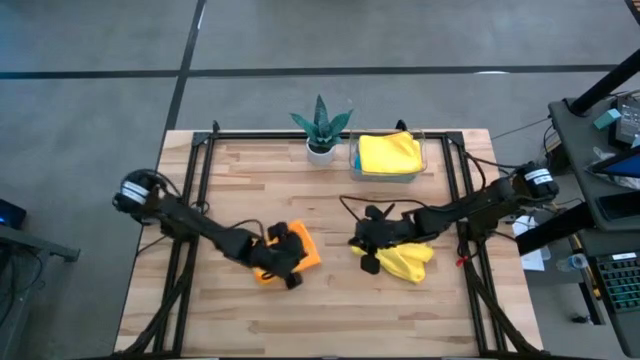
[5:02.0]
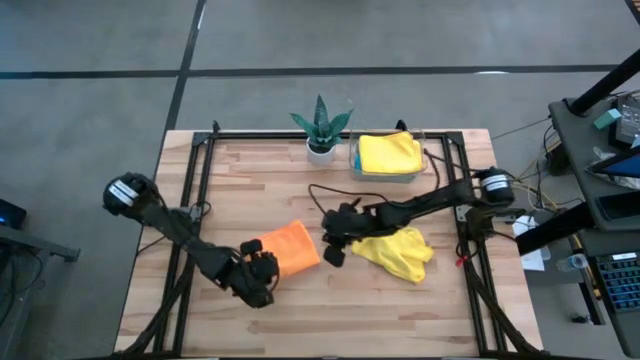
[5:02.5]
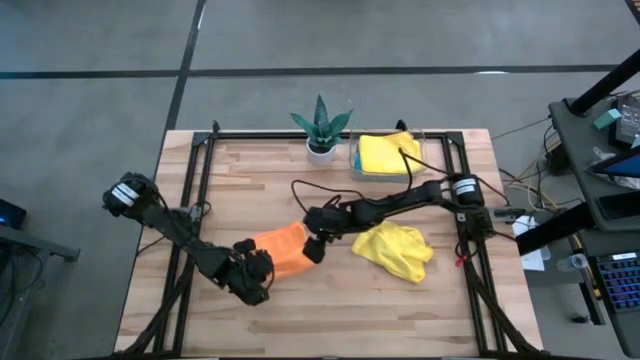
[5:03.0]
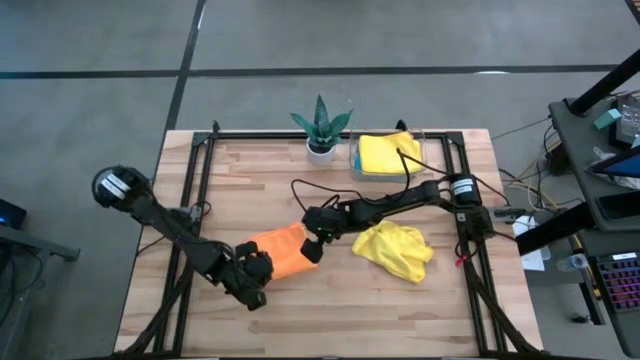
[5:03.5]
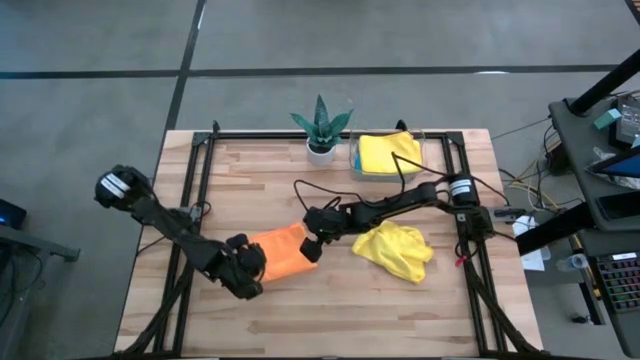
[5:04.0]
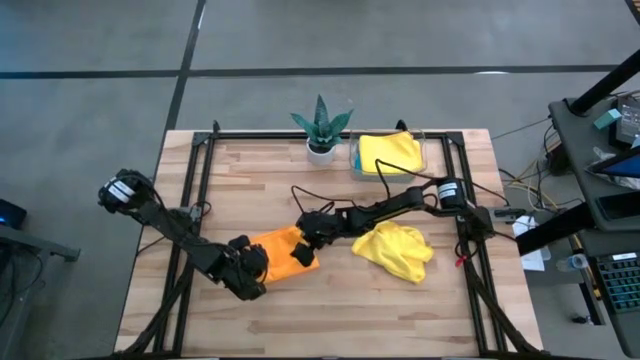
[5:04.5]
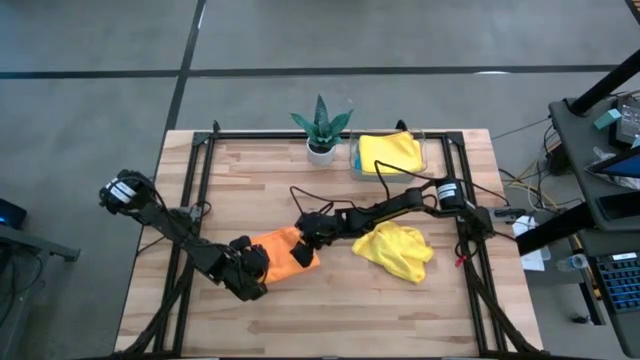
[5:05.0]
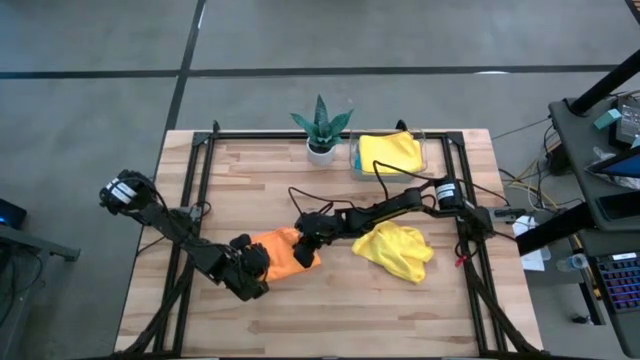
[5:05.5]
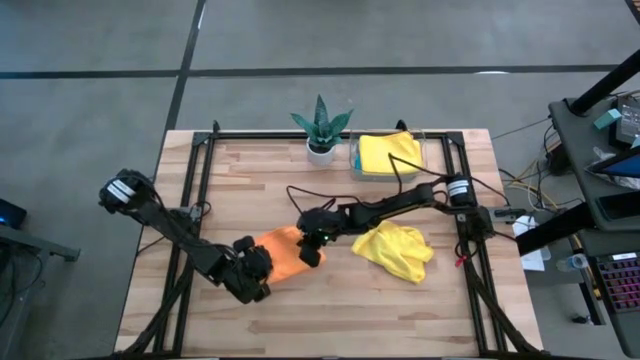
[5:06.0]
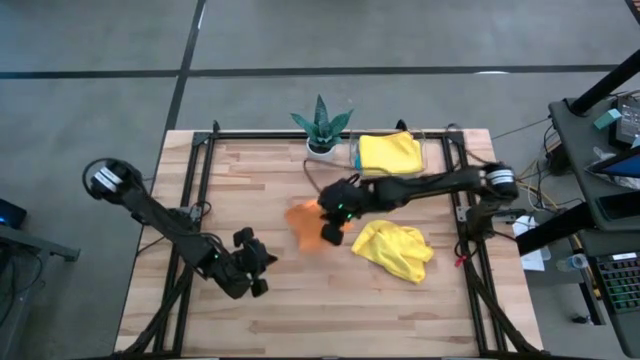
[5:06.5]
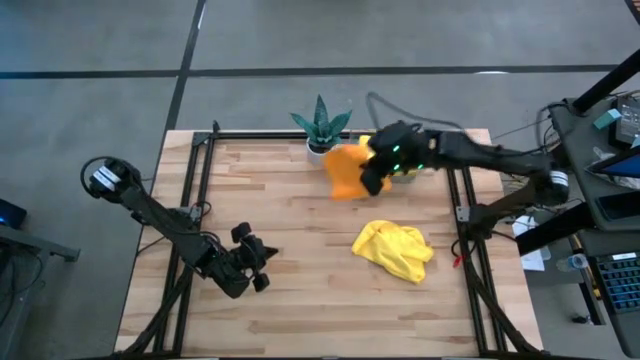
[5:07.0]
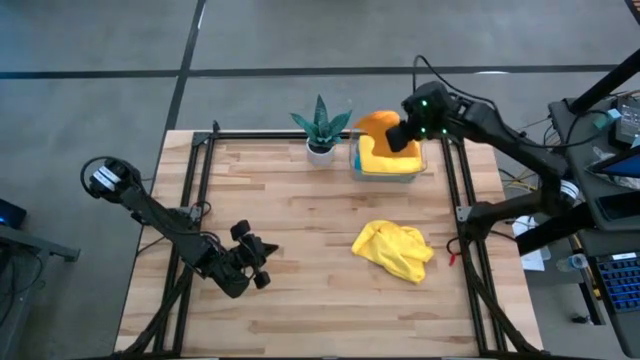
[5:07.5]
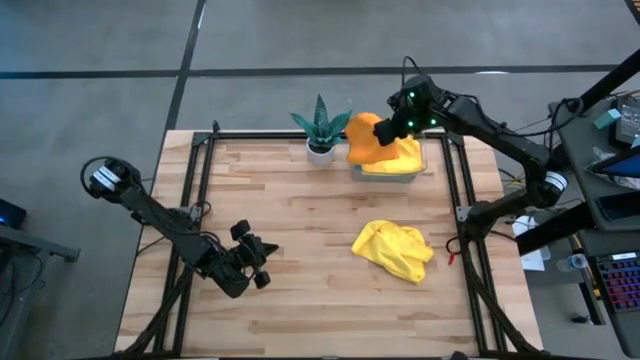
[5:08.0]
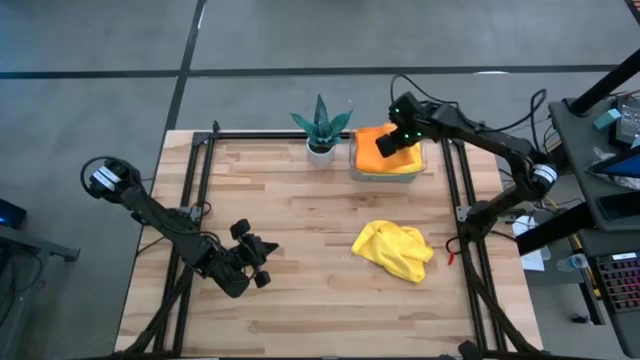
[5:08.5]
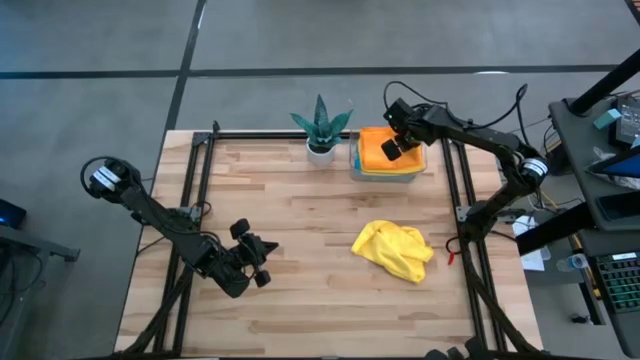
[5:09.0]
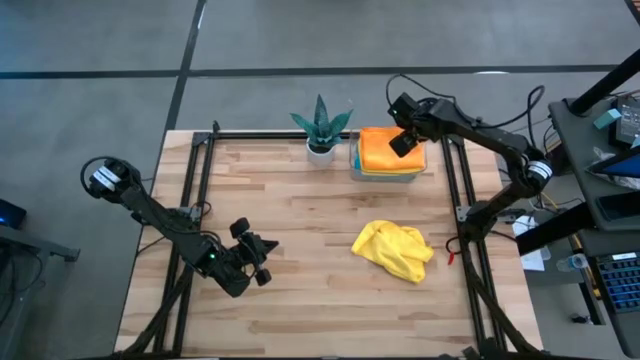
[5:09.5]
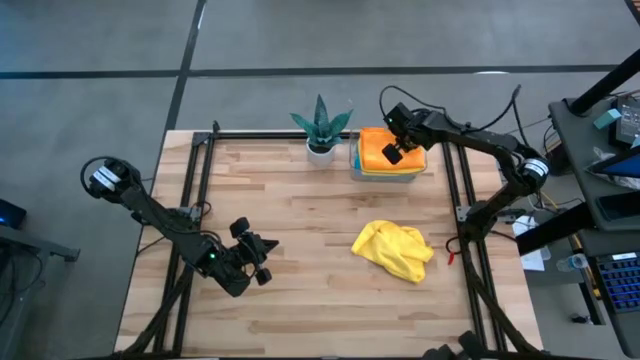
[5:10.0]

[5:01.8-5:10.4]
Task: Fold microfiber towels
Put the orange microfiber towel into the transparent bin

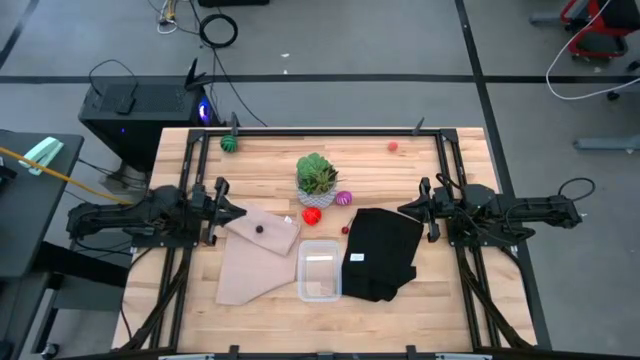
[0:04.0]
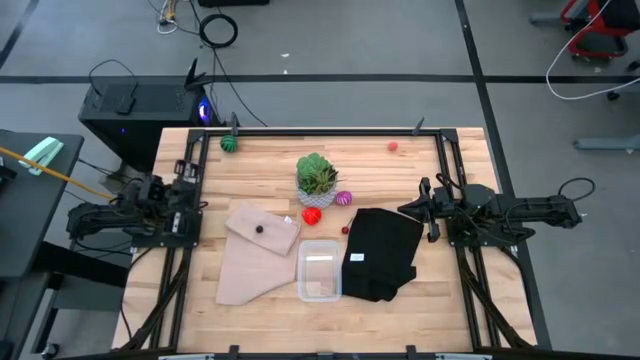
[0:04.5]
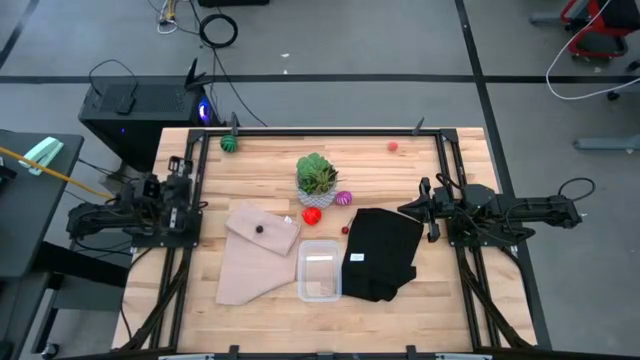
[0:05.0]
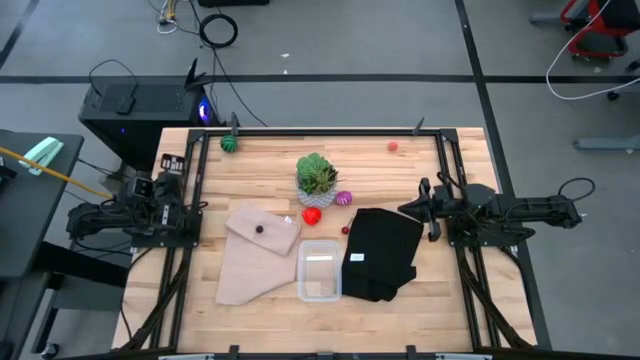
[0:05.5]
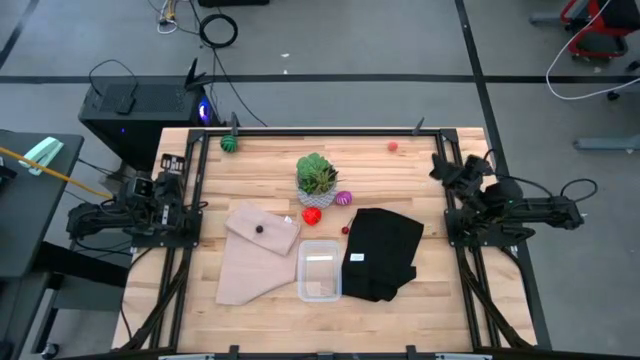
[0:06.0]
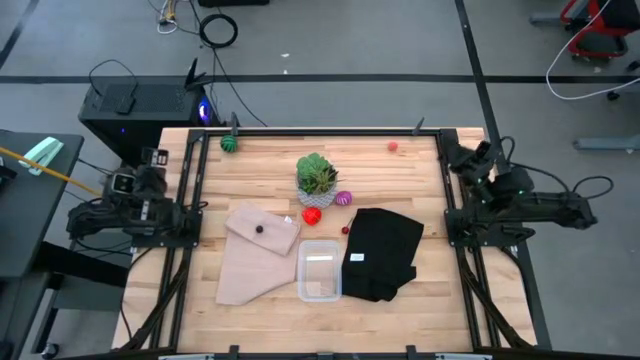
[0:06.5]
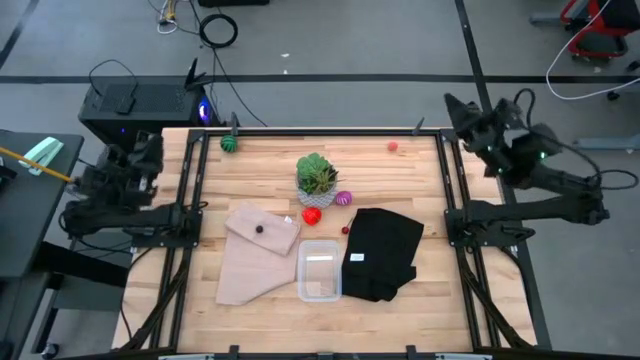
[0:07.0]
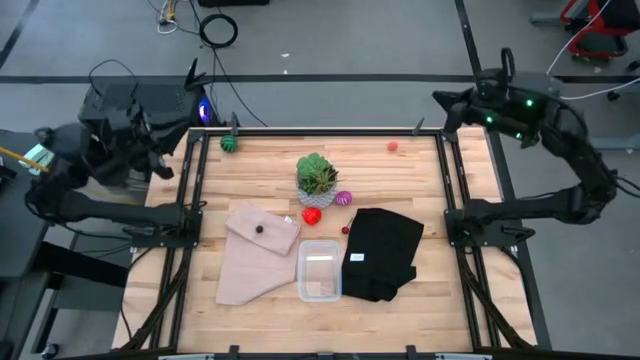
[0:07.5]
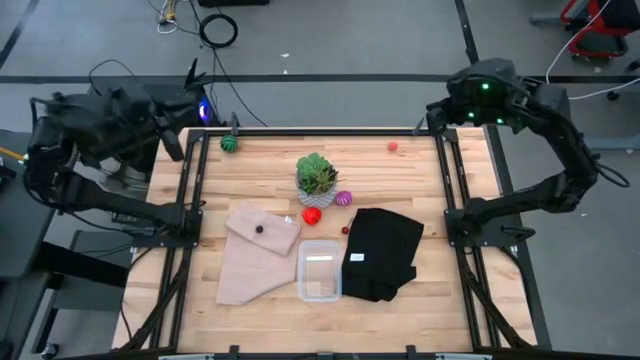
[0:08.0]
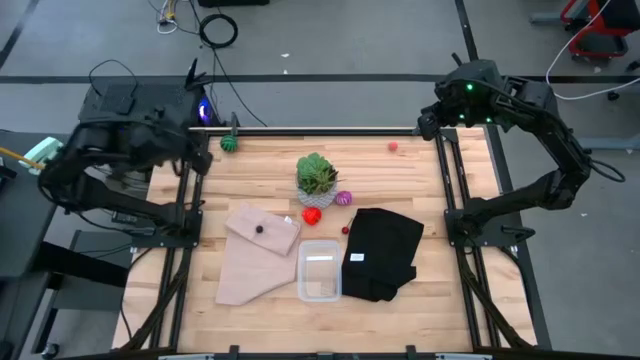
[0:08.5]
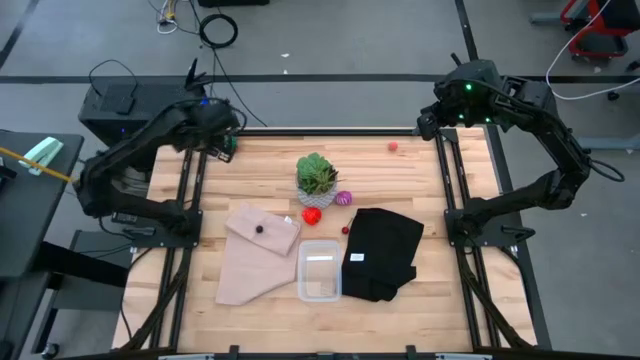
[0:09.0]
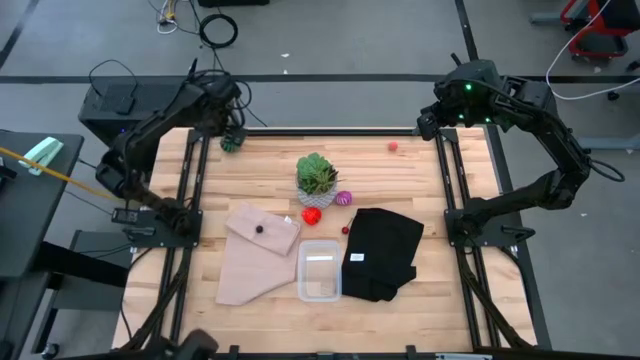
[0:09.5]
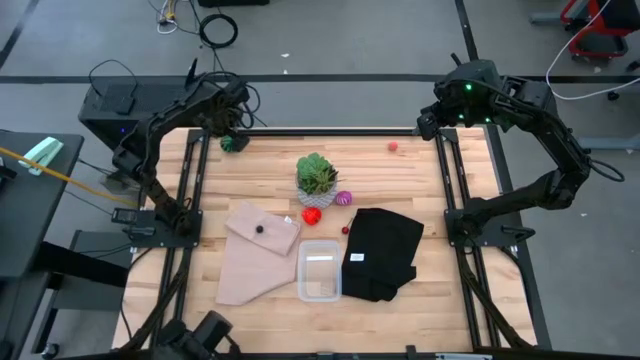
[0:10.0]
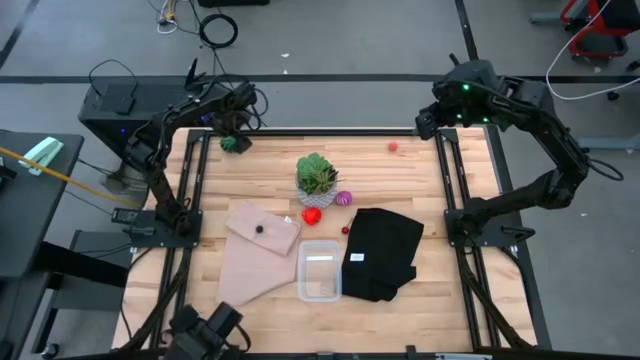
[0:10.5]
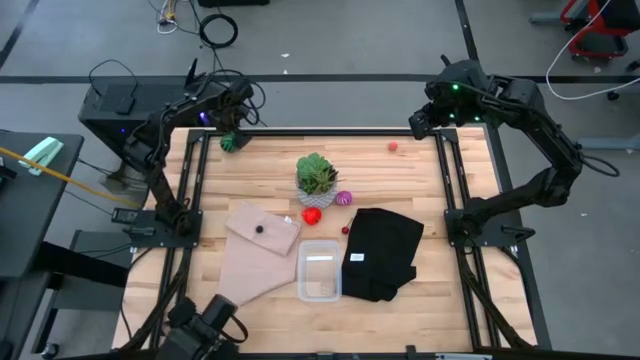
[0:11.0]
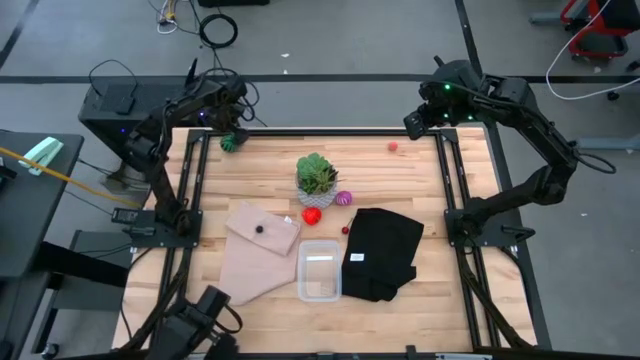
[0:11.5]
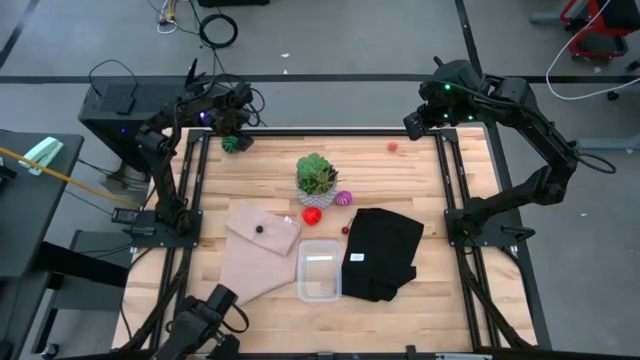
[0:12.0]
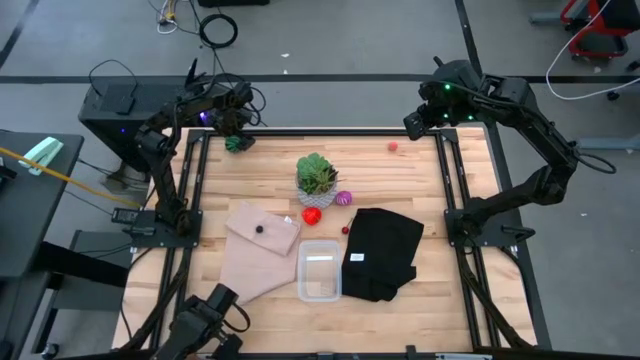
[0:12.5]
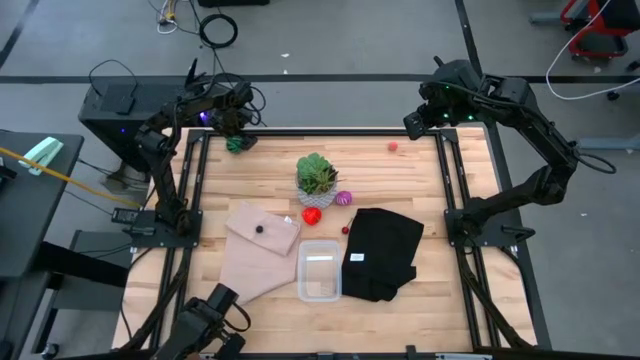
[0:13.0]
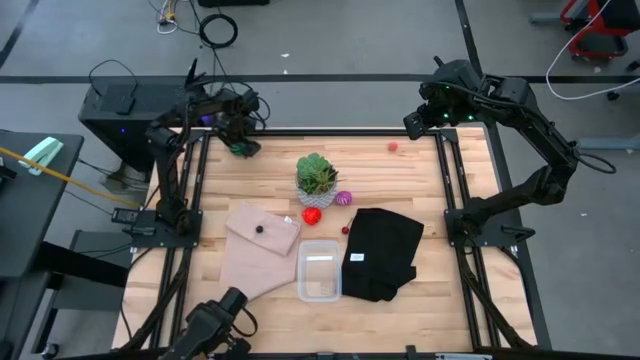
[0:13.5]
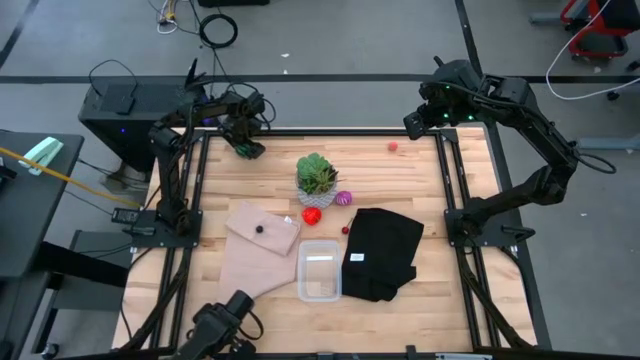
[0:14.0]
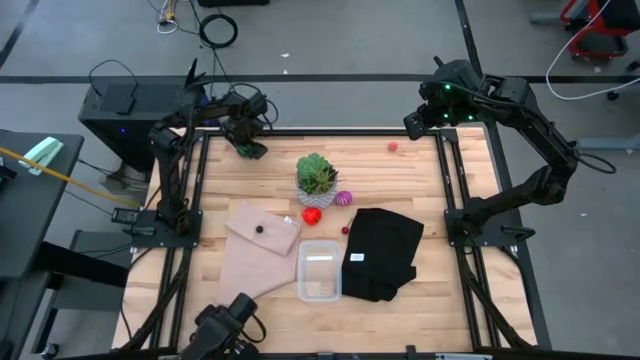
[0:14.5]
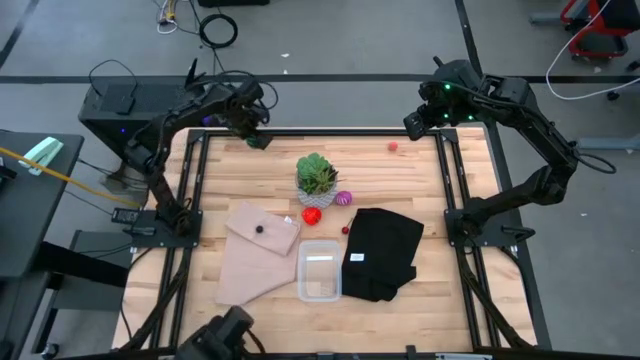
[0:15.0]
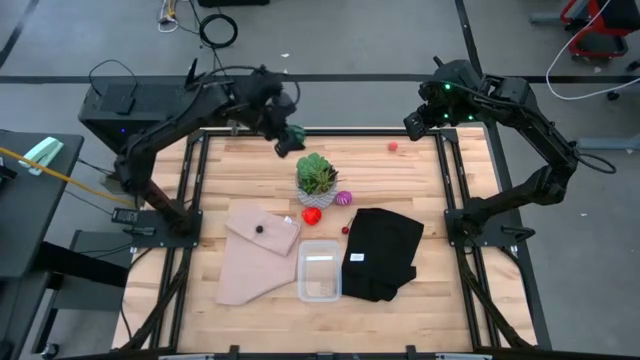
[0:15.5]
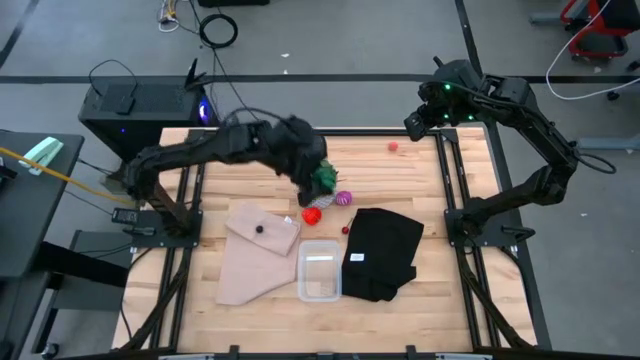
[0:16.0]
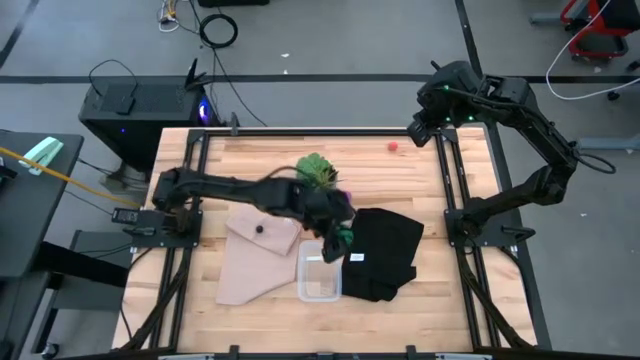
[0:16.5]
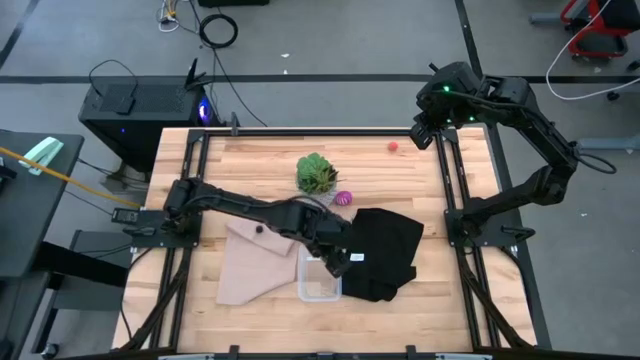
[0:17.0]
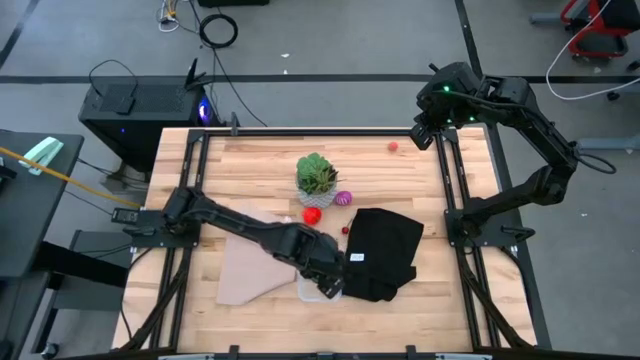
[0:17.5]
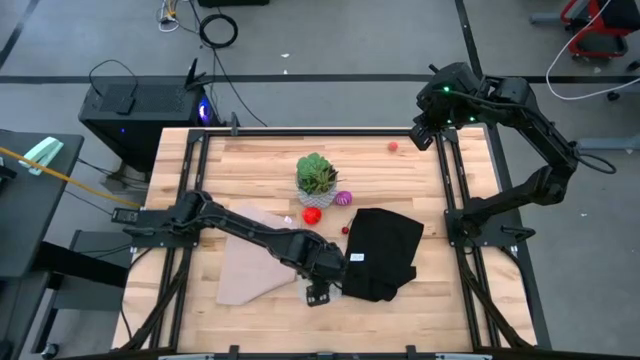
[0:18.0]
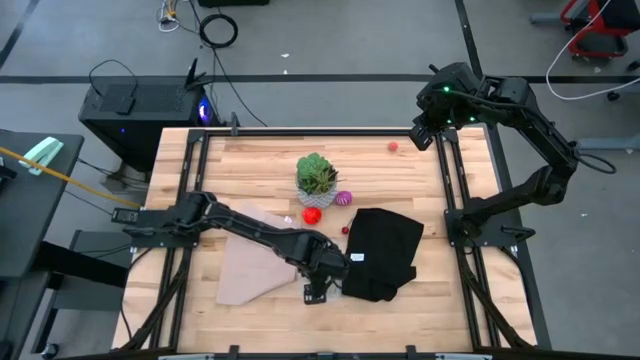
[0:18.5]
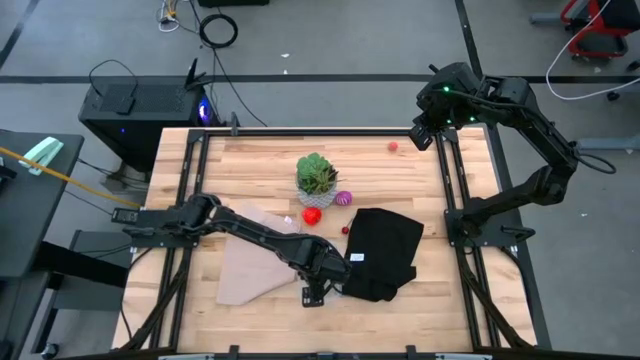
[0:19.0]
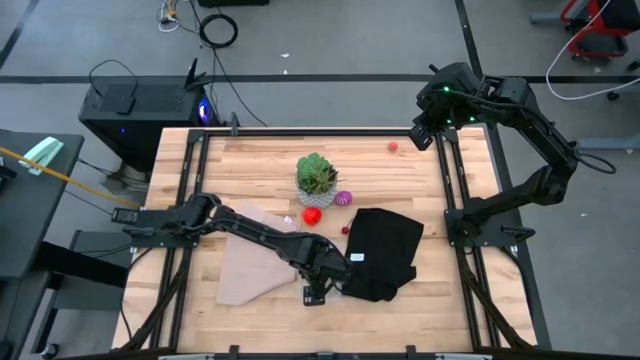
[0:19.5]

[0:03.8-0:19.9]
Task: Pick and placing Produce into tupperware
Put the green watermelon into the transparent container
